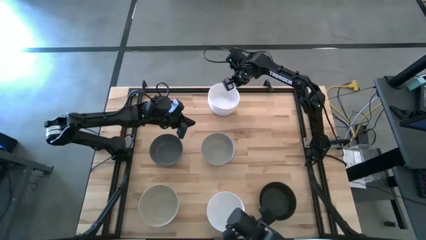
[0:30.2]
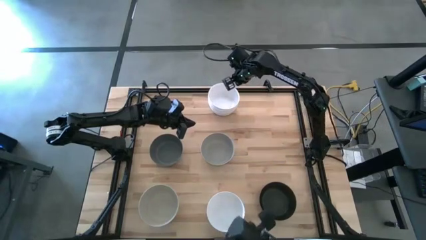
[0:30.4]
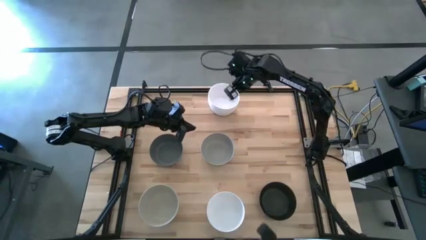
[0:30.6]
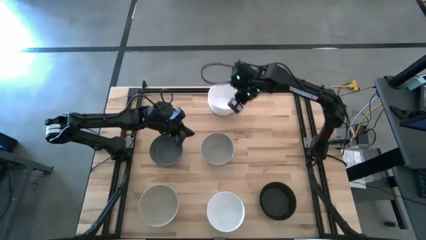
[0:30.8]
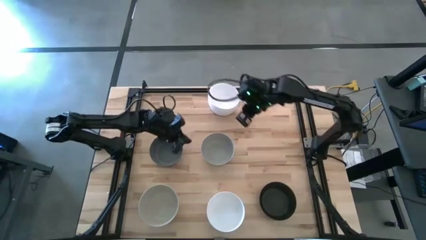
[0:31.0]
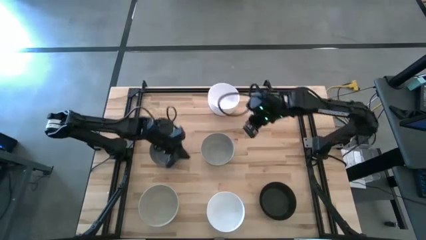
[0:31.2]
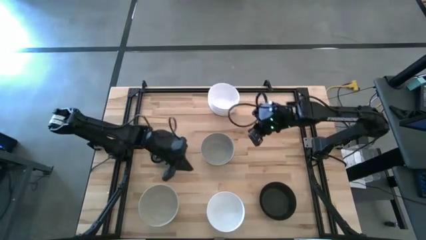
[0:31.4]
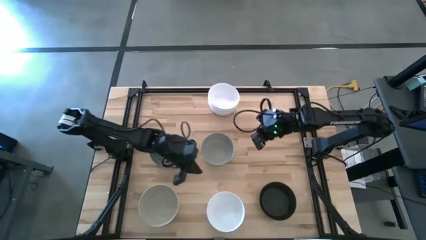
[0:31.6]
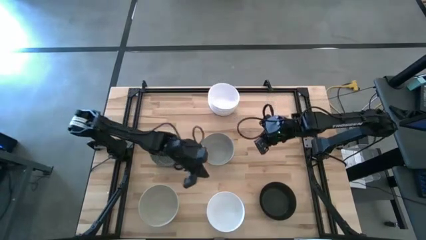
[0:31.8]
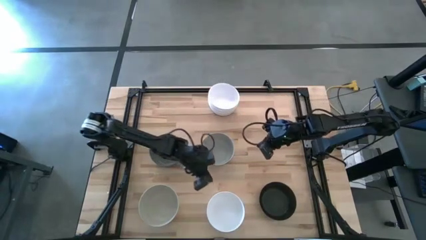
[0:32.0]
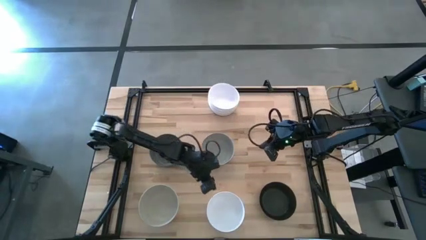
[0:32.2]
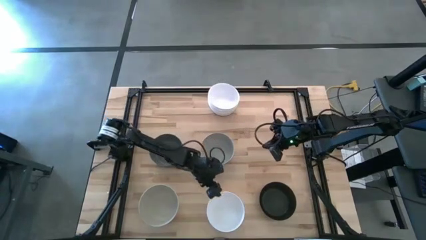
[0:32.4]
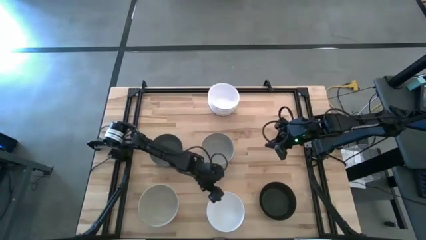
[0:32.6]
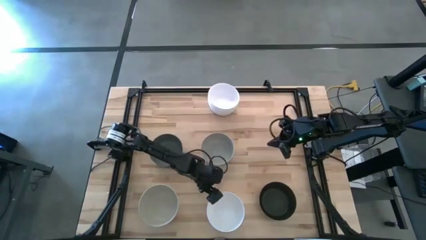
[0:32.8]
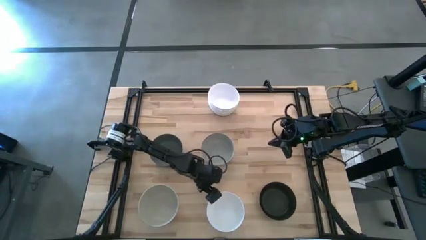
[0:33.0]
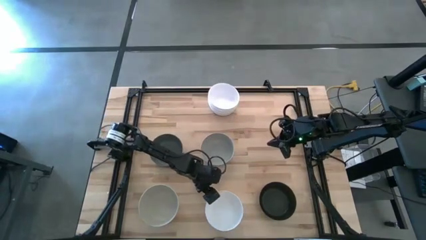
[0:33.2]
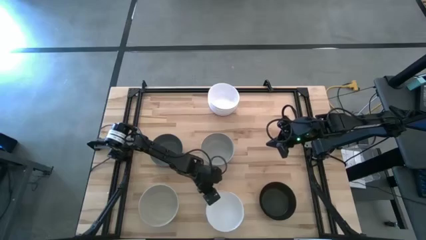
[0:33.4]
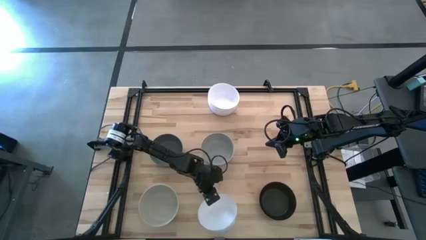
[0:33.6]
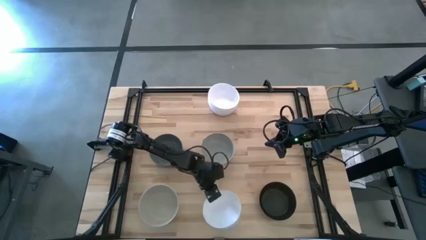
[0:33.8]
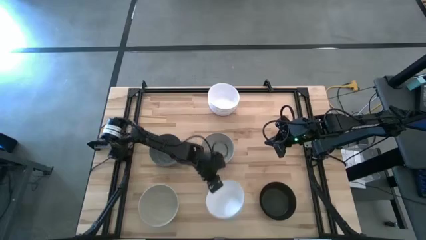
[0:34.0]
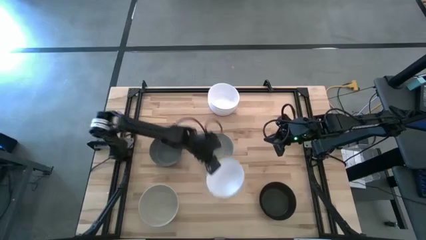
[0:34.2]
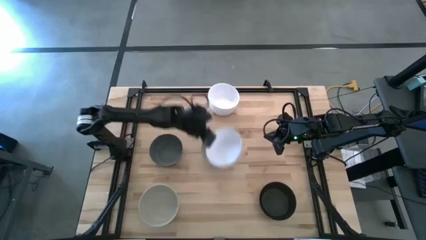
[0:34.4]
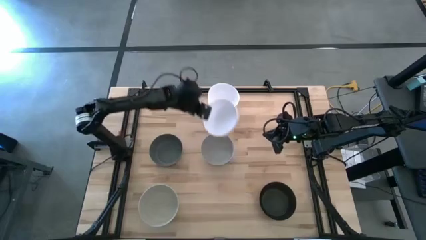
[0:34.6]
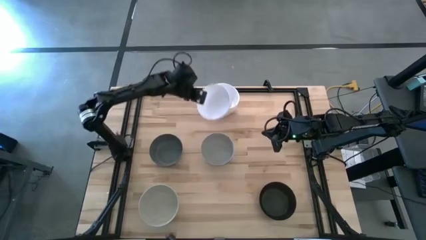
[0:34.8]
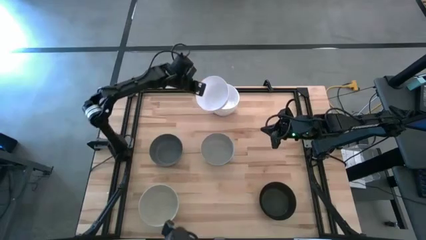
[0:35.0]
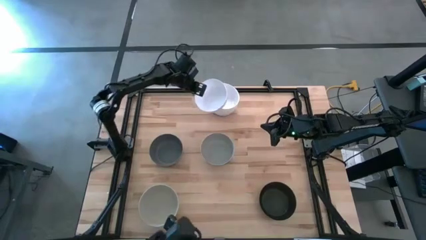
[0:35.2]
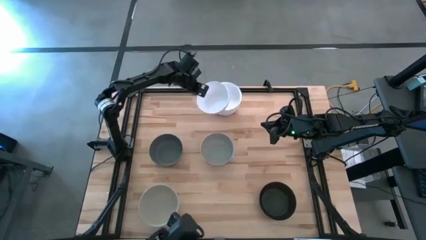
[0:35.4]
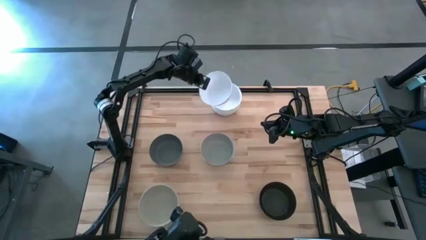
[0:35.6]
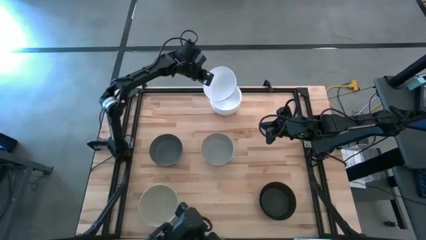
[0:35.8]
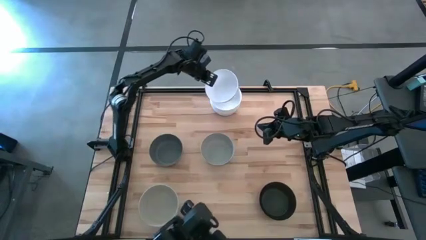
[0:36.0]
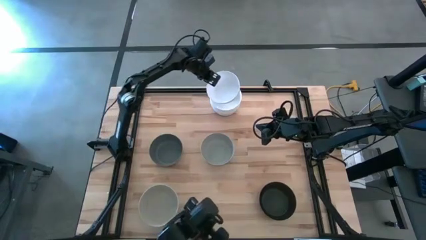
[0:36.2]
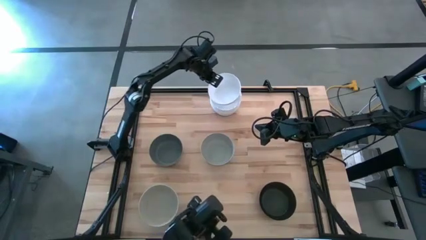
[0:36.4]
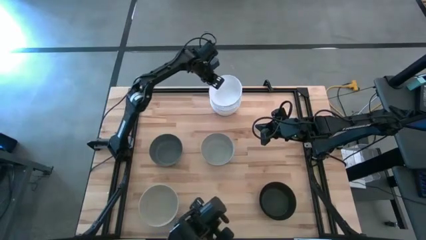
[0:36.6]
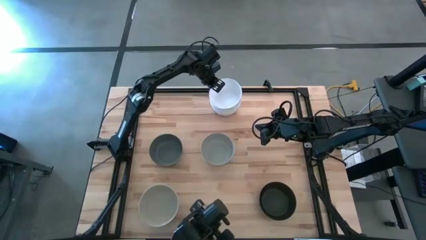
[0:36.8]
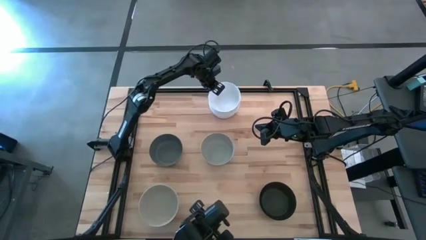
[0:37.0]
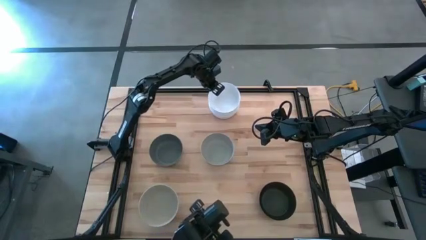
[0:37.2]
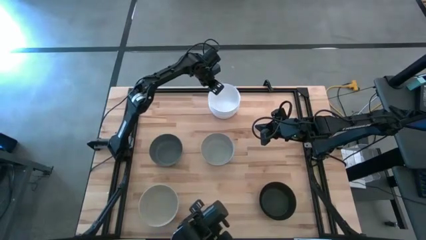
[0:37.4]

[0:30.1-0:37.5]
Task: Nest bowls inside each other
Stack the white bowl on the stacked white bowl

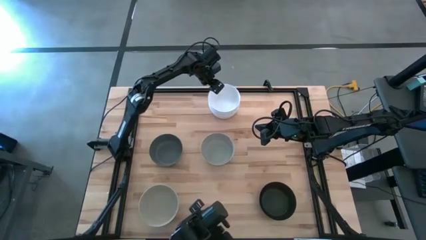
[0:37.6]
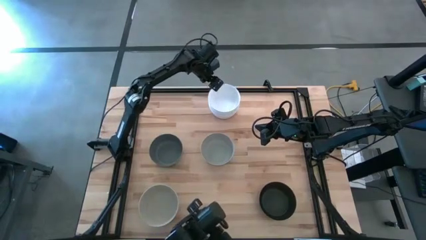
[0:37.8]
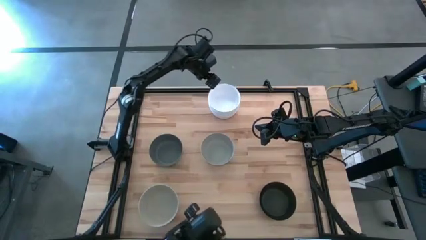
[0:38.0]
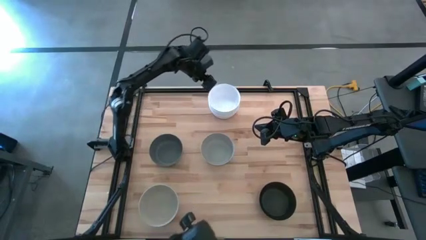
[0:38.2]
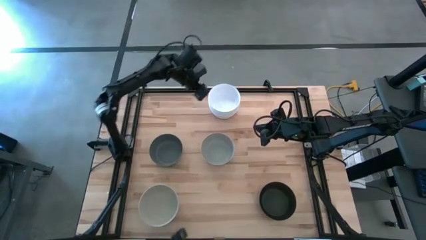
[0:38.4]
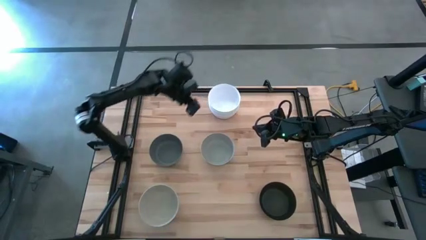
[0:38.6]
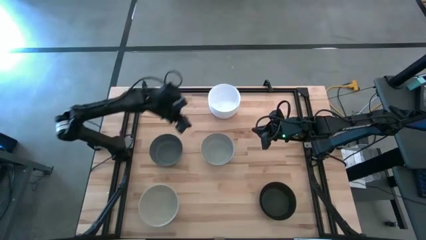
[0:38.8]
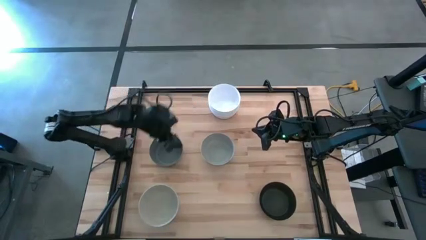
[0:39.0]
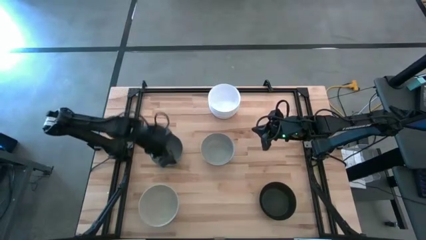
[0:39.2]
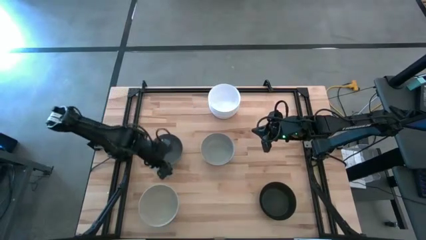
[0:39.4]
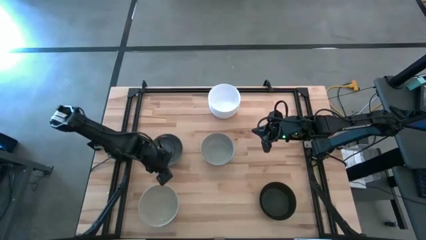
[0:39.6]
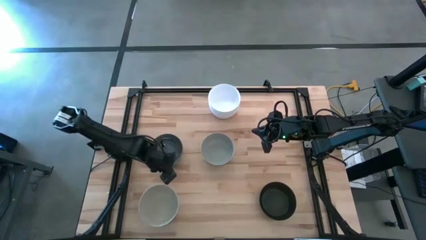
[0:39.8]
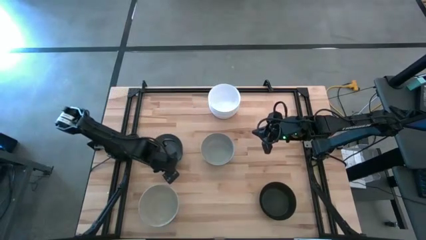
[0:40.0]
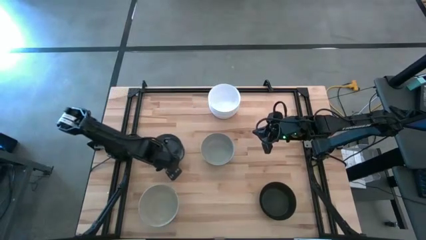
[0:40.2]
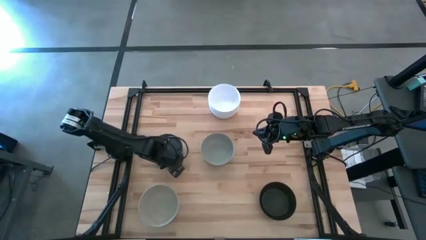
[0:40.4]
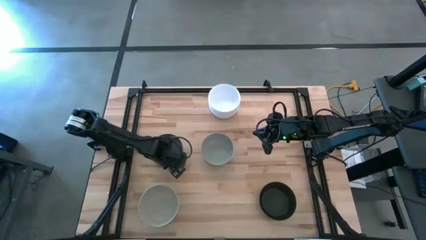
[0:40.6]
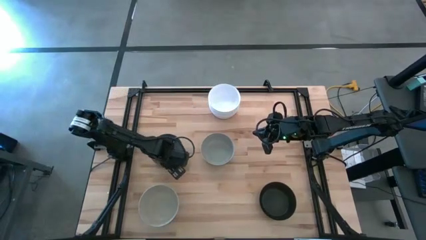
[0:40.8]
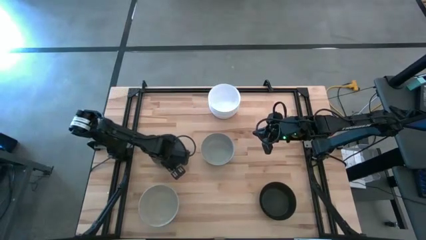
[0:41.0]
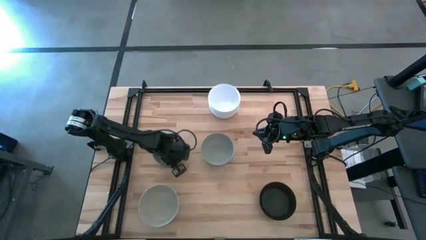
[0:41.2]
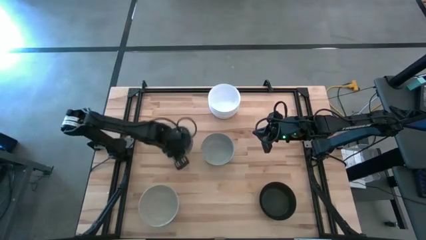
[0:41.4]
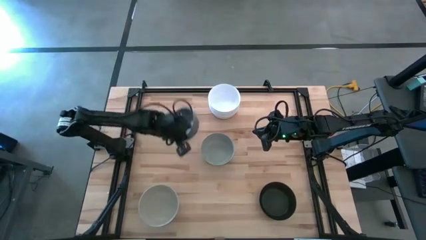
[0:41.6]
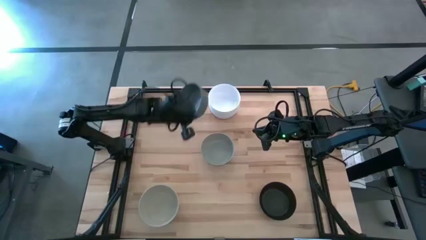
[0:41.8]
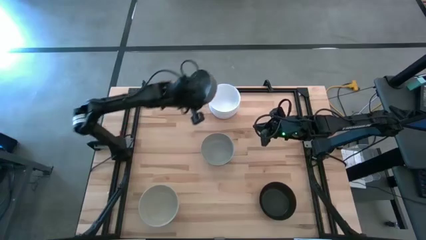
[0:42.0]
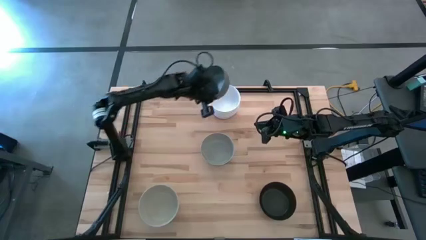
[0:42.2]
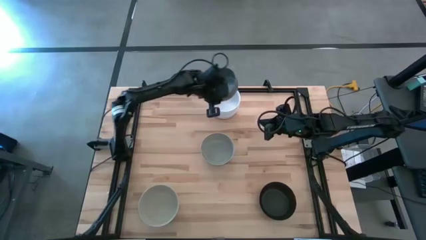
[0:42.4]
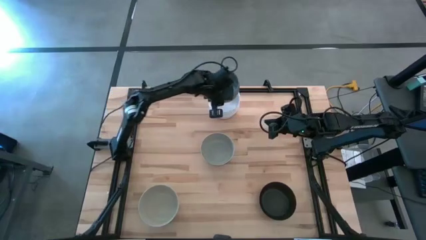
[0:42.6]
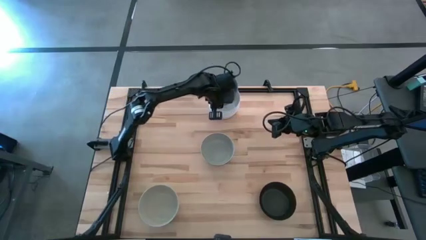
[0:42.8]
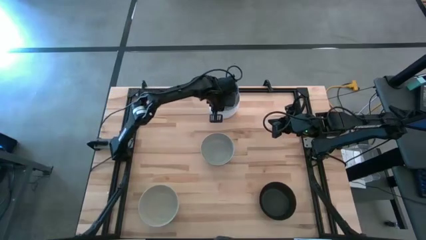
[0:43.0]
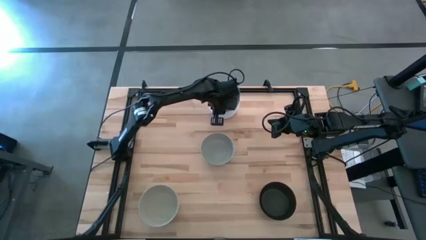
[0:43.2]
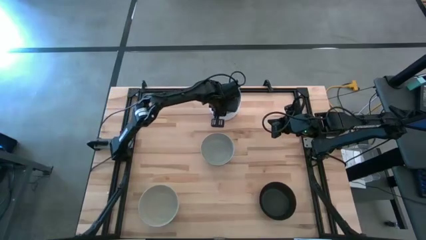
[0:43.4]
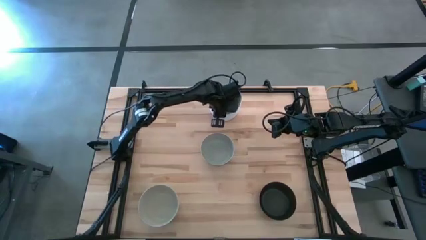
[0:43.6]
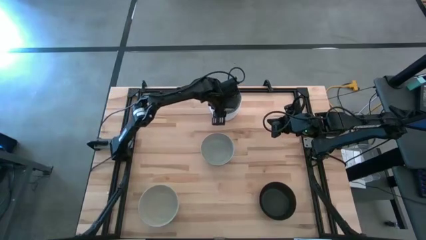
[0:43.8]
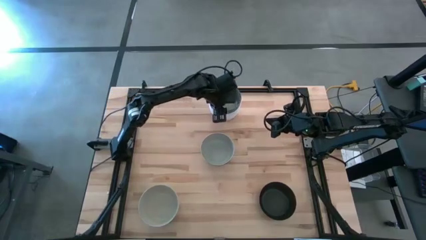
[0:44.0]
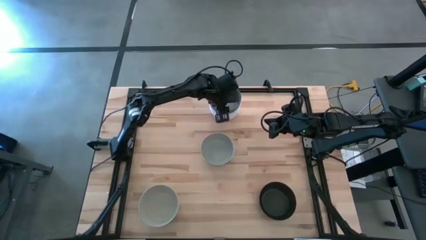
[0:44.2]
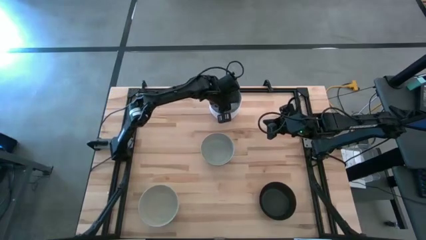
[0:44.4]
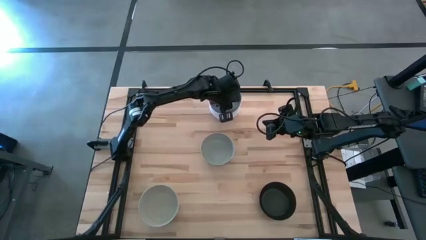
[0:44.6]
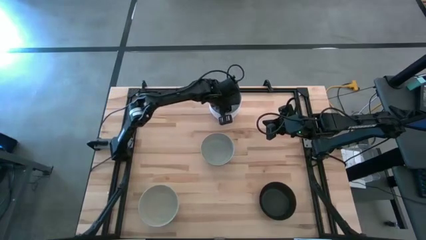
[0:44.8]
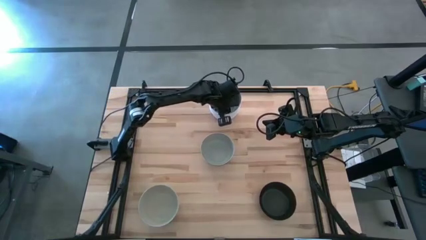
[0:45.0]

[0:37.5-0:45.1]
Stack the dark gray bowl on the stacked white bowl
